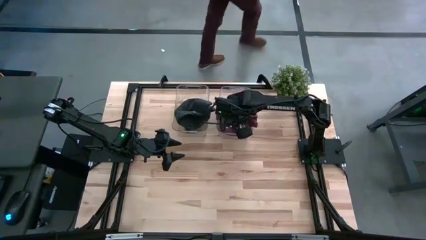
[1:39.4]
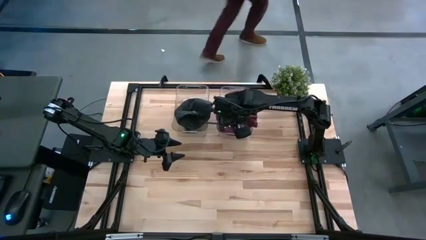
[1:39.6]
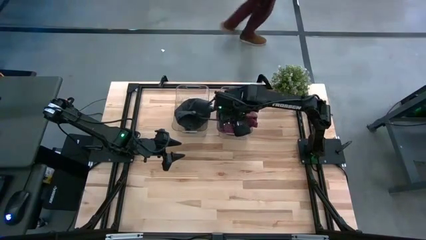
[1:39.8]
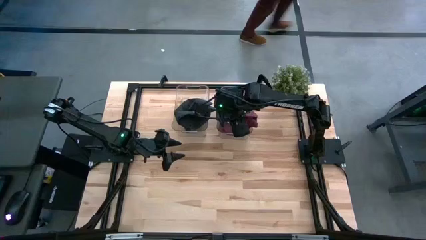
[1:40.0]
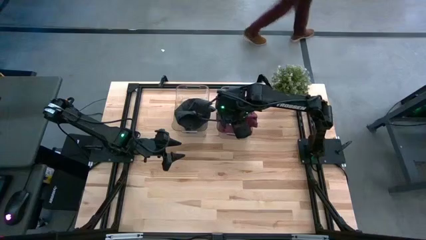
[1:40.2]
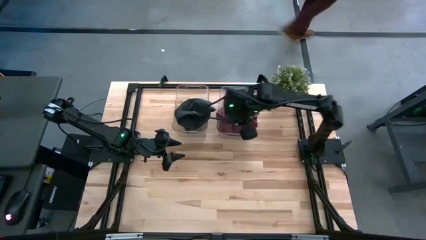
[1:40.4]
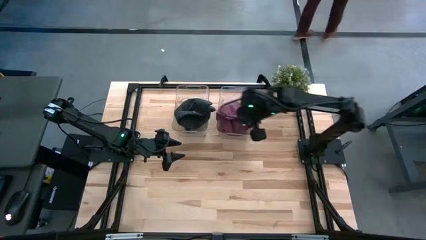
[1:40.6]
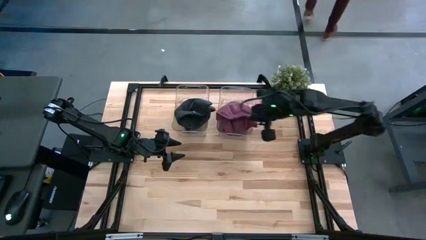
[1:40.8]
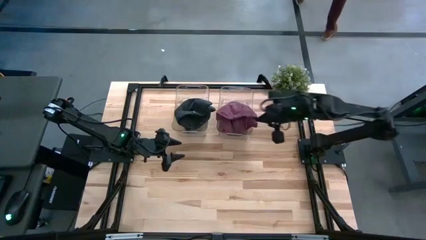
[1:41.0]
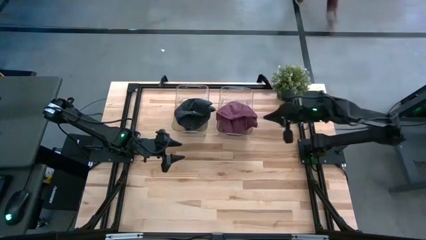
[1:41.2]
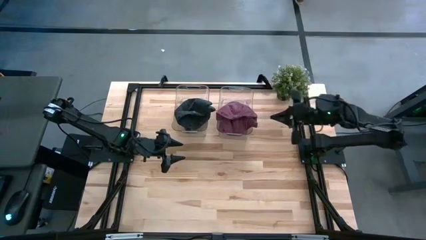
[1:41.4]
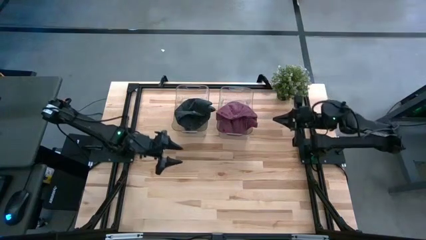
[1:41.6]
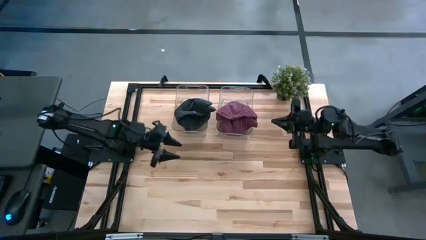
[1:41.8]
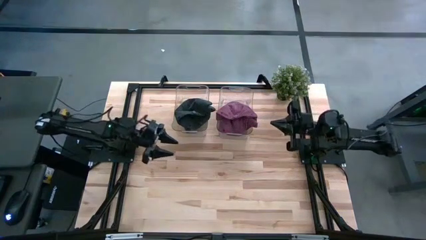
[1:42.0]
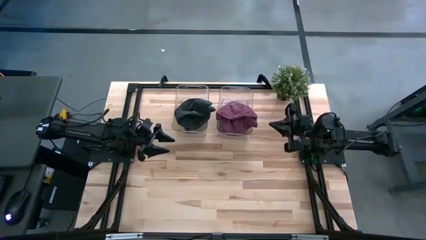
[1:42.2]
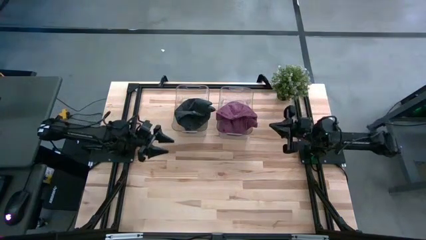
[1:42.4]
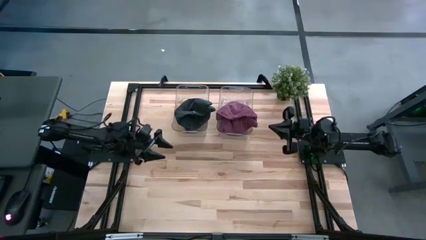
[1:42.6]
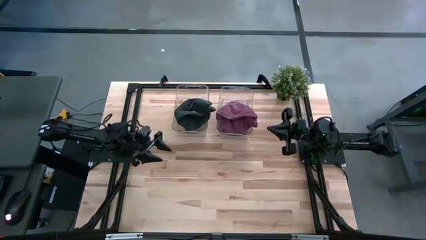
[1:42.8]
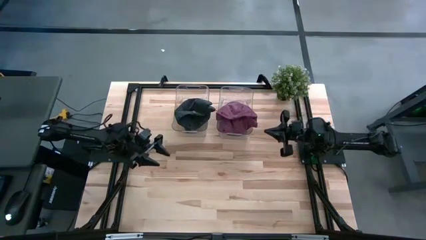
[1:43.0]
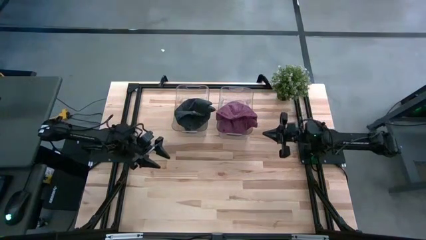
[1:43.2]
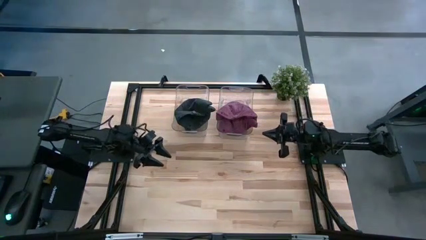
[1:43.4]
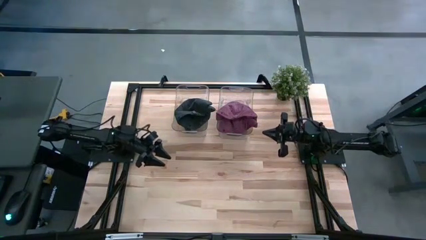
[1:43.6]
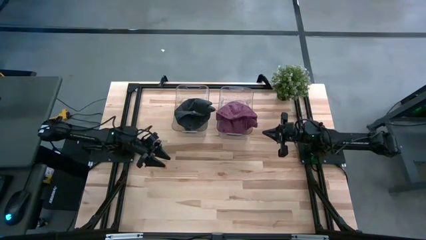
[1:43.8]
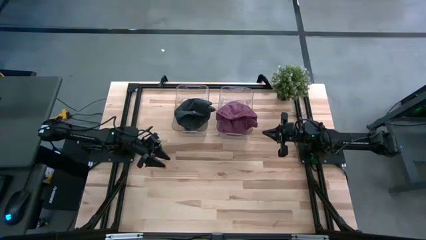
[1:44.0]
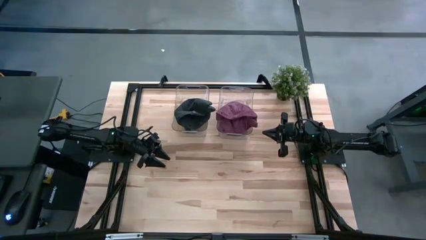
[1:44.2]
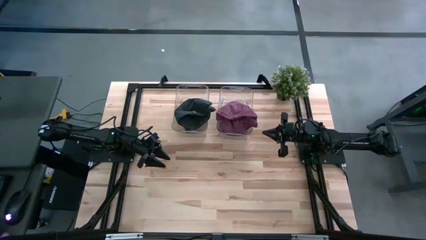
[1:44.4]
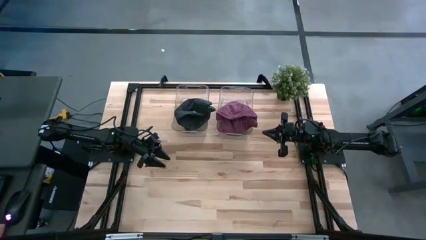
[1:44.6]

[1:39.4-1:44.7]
Task: Pick & Place hat
Return to Home Position

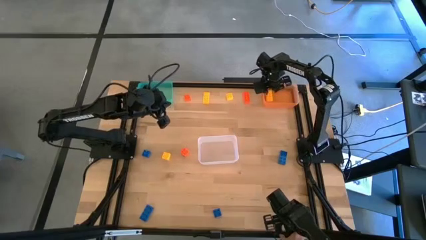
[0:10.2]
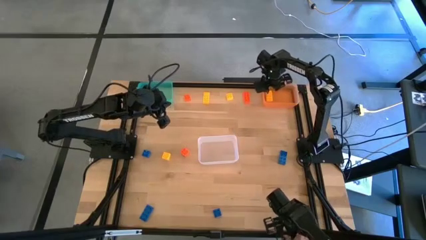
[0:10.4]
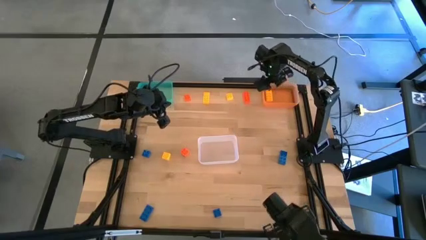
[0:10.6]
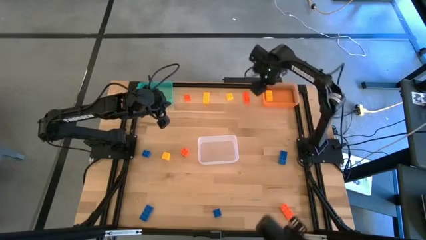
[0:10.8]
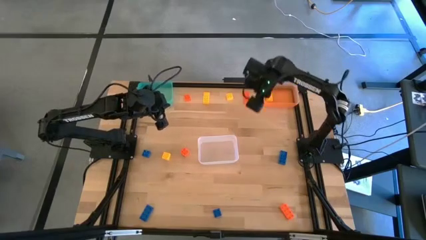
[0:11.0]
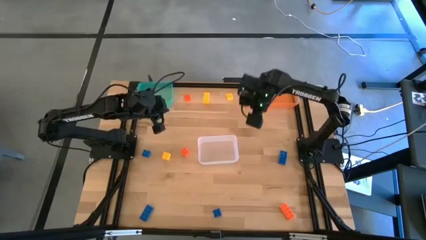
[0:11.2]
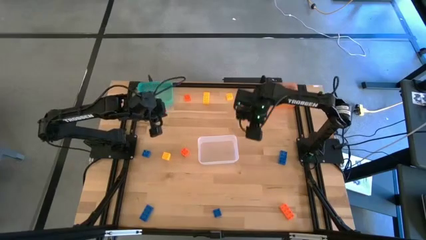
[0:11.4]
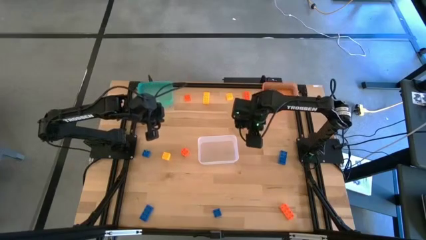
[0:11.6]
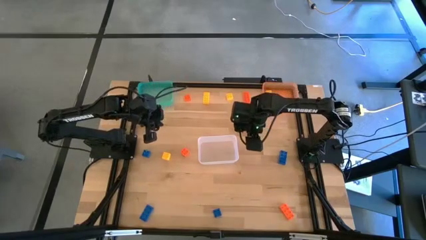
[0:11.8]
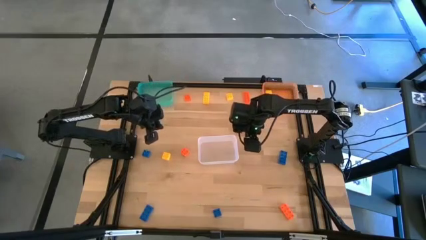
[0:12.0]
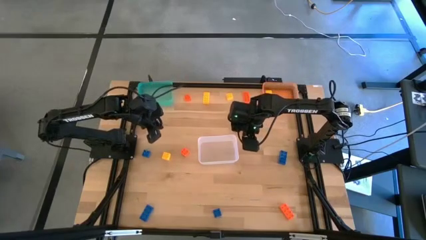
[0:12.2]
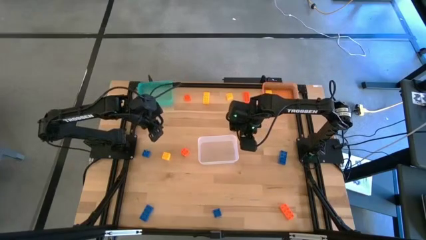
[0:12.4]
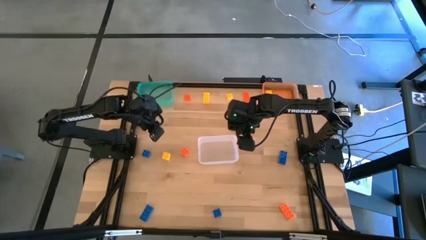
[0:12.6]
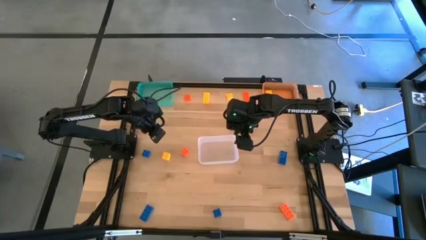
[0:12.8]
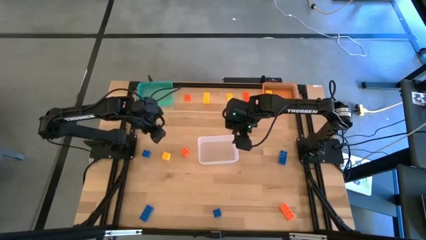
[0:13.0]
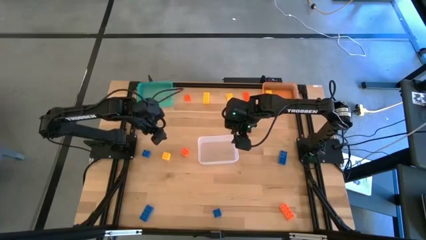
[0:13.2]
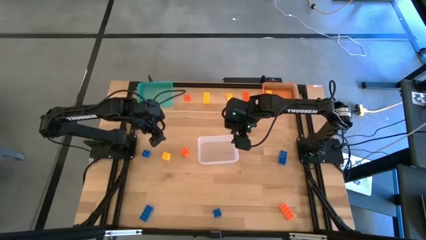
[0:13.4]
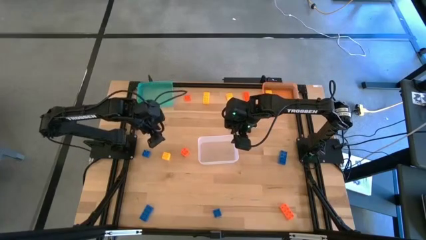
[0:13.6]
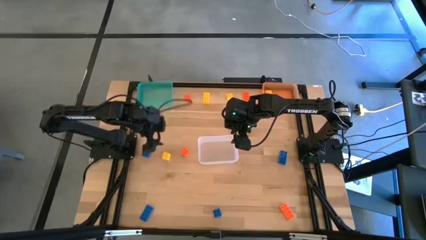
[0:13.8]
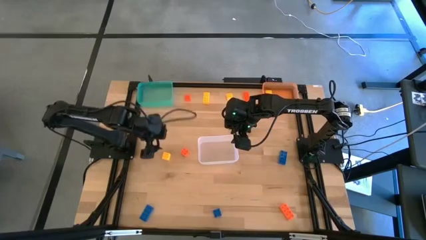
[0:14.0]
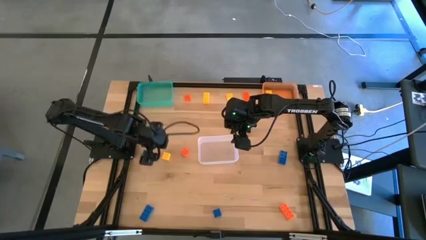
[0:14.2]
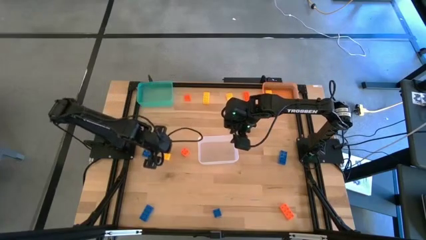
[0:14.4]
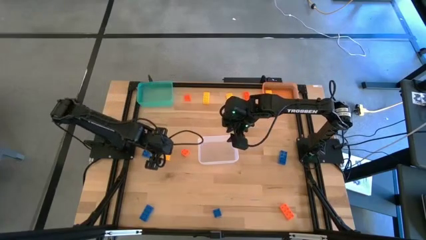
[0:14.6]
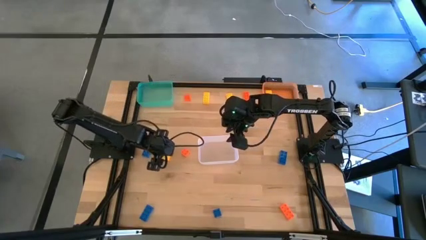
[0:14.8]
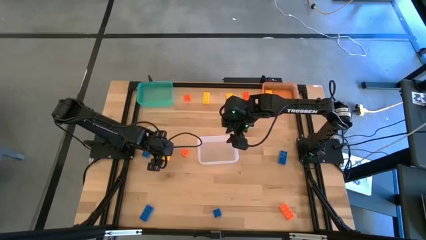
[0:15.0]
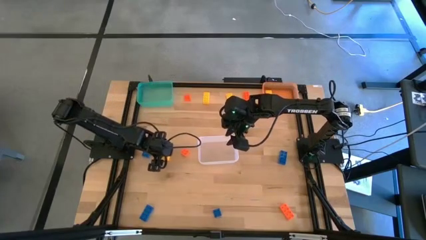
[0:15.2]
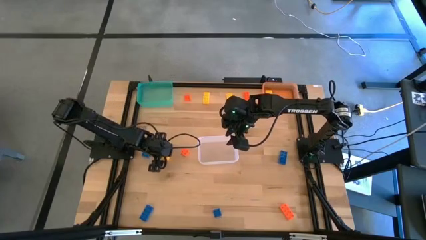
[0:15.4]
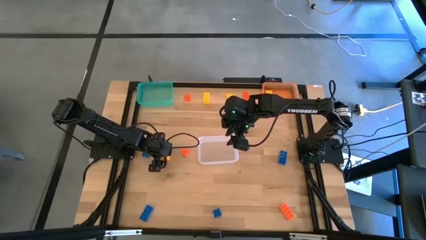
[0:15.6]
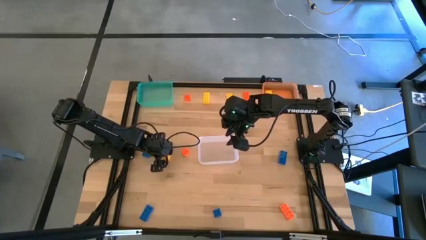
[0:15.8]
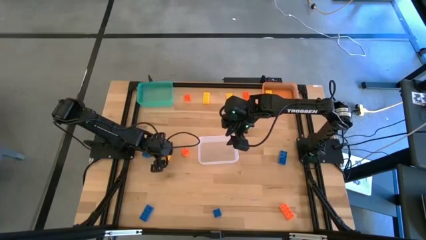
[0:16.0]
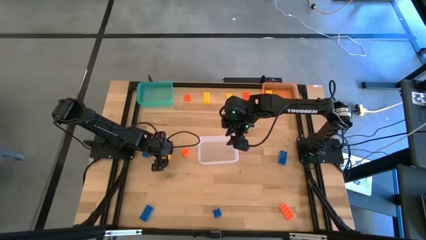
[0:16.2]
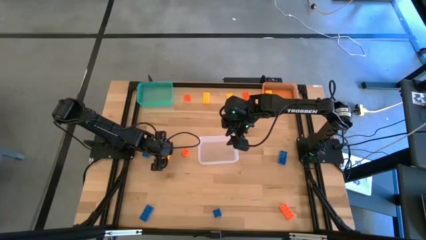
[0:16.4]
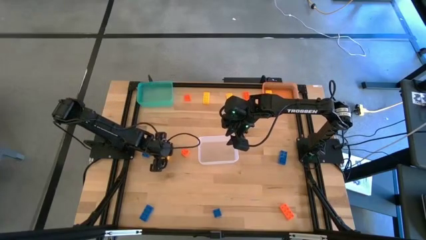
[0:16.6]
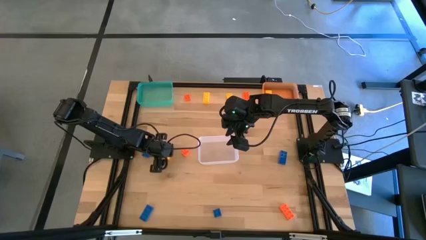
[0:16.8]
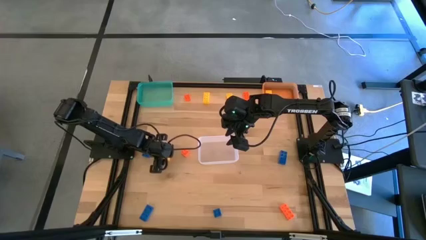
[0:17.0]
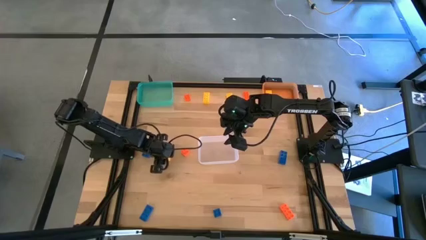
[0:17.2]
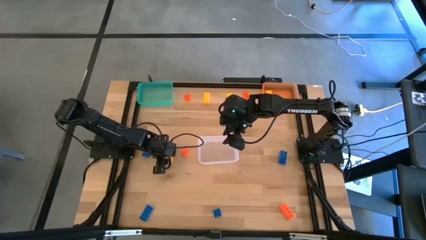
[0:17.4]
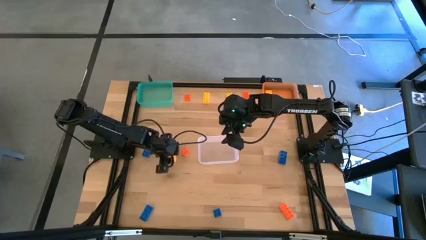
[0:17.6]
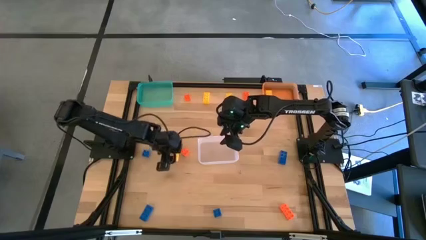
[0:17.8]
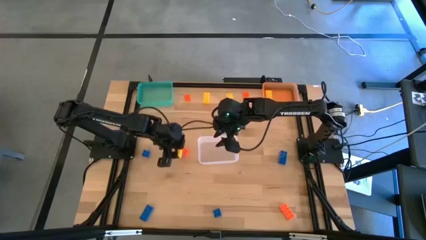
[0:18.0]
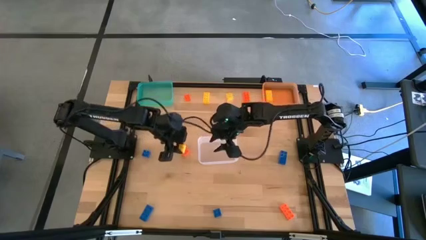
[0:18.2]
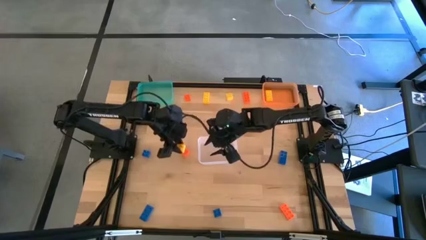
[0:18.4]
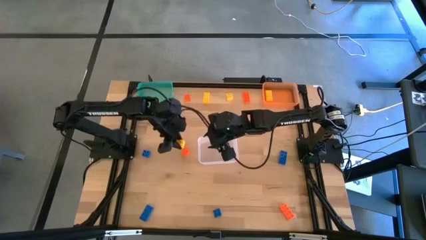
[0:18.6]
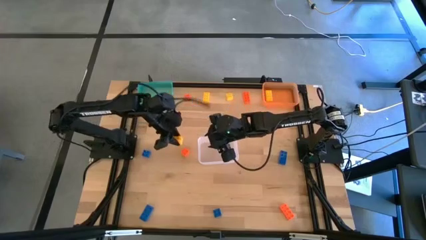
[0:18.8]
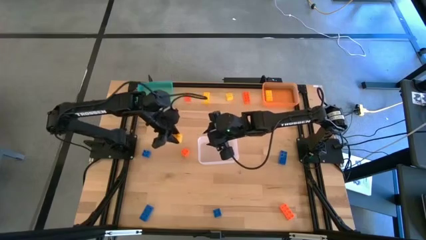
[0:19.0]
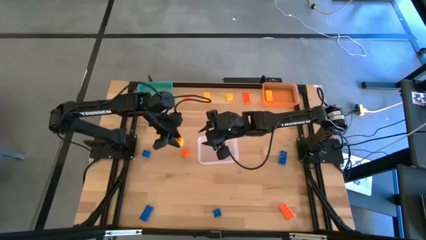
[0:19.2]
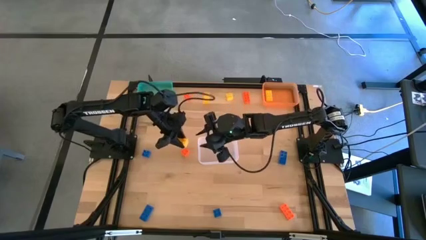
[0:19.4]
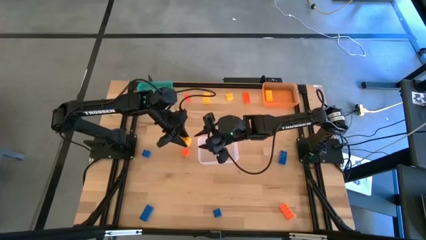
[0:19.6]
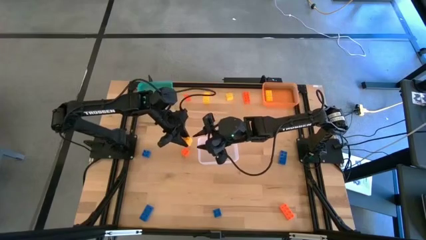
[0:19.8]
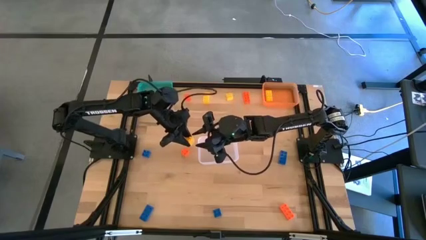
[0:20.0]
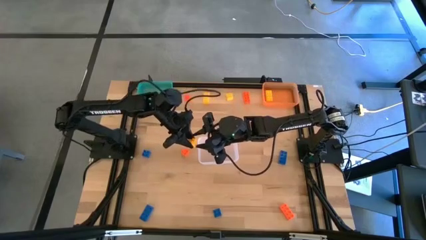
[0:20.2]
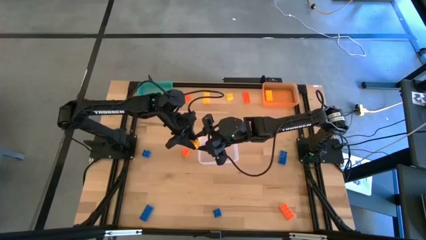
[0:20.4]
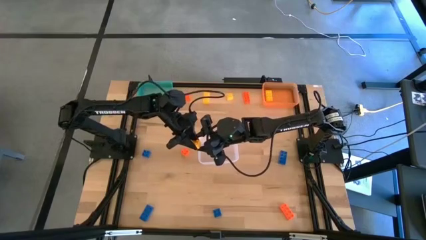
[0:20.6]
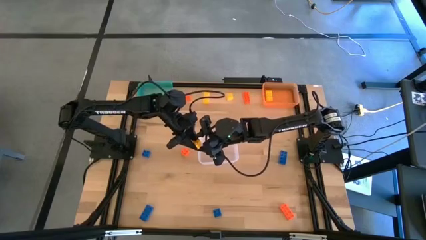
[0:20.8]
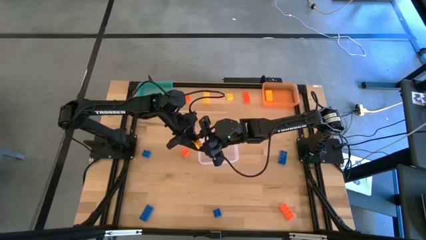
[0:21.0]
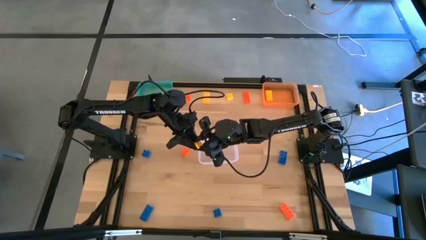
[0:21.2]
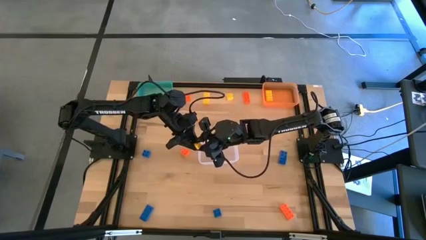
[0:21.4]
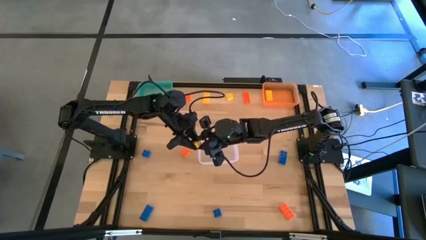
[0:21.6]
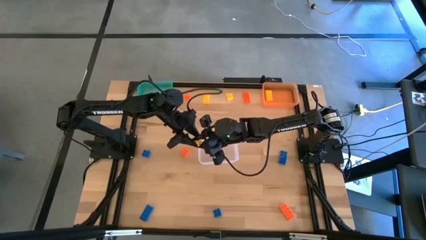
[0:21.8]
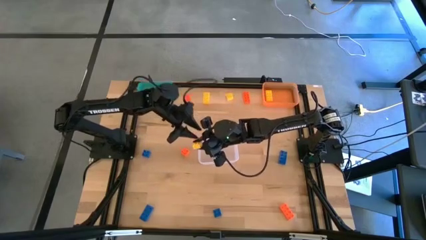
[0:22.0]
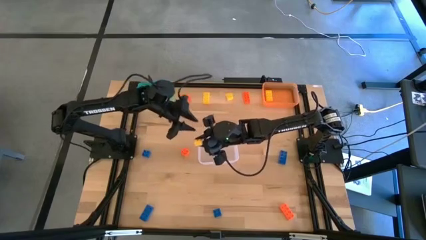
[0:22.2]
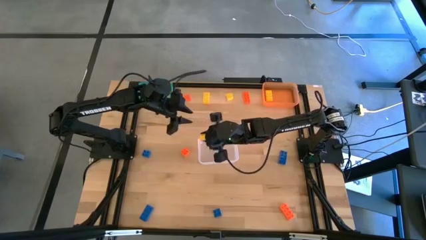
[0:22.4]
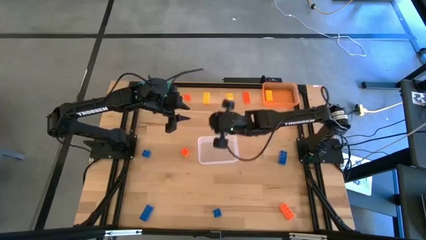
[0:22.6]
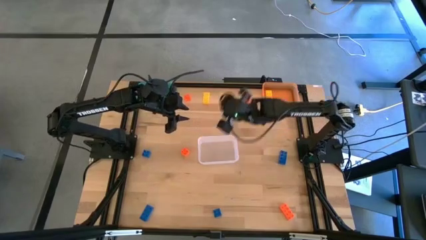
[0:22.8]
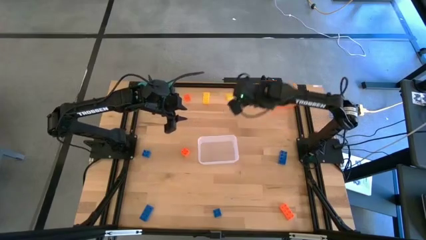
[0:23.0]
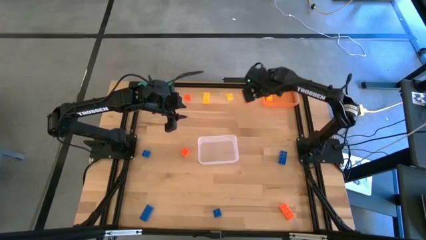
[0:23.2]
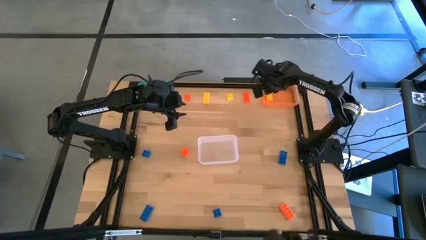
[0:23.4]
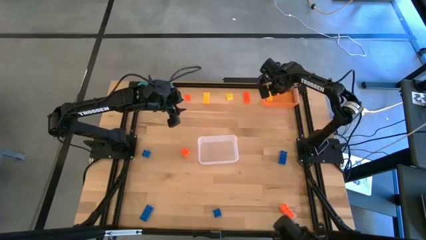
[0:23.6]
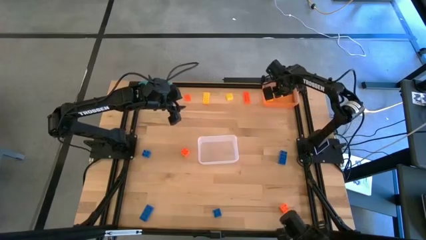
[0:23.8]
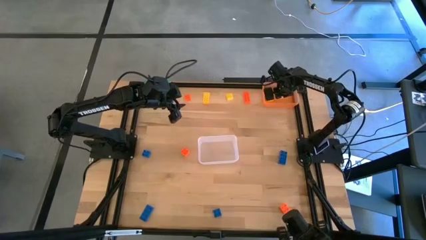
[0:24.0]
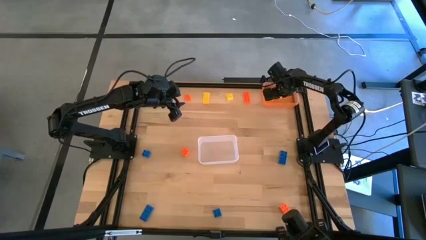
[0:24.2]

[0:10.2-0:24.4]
Task: Sort & place blocks by color
Put the bottom left yellow game piece into the orange bin
